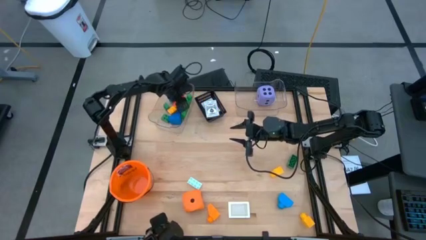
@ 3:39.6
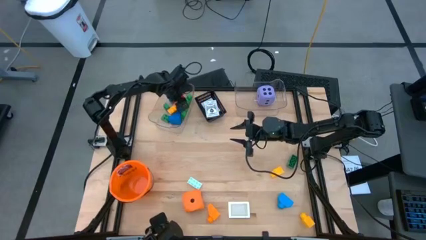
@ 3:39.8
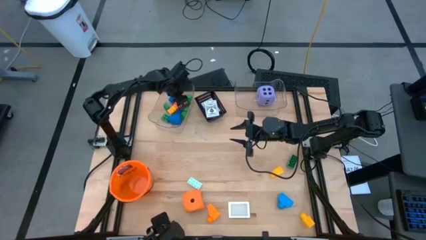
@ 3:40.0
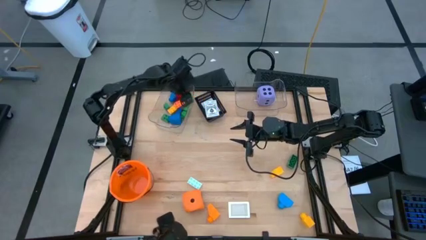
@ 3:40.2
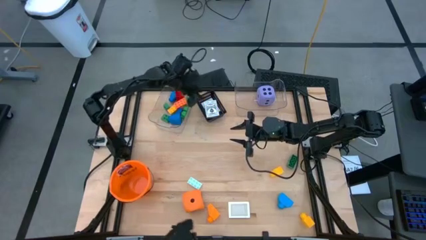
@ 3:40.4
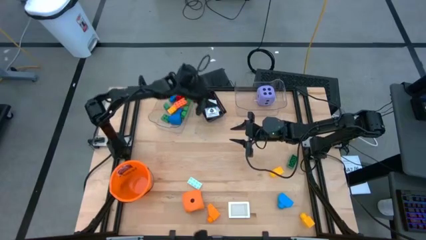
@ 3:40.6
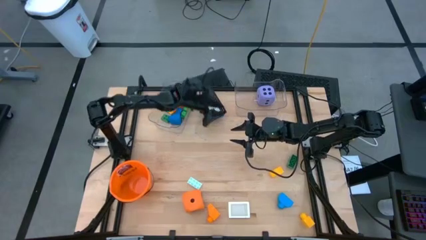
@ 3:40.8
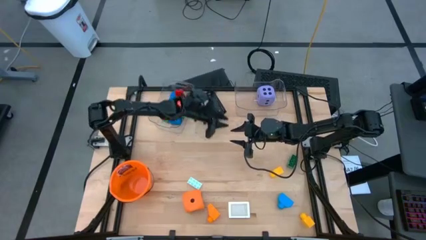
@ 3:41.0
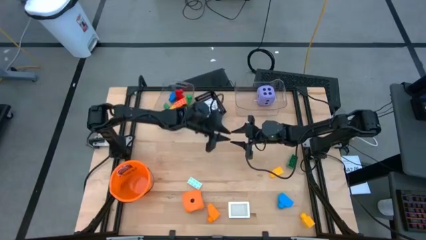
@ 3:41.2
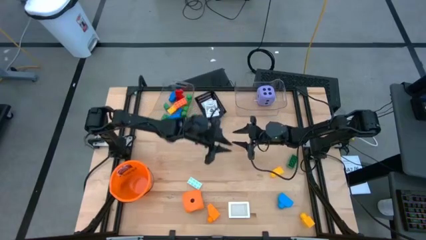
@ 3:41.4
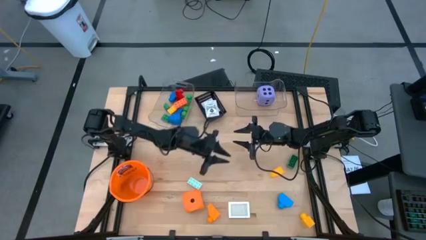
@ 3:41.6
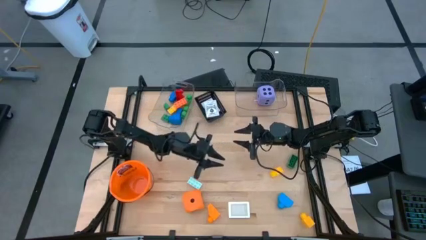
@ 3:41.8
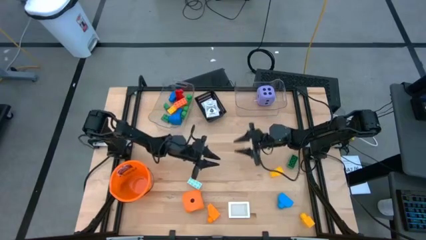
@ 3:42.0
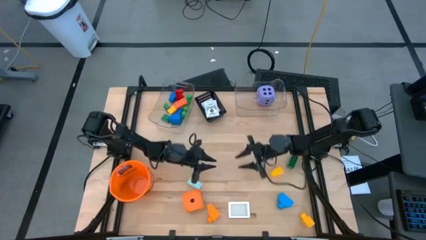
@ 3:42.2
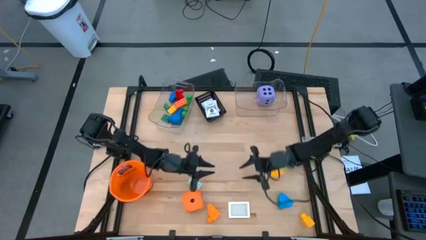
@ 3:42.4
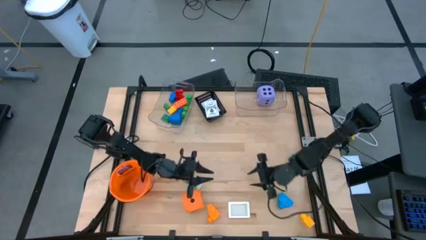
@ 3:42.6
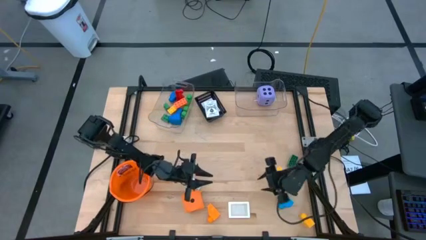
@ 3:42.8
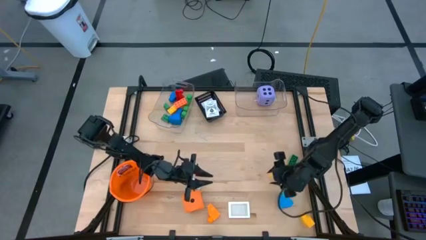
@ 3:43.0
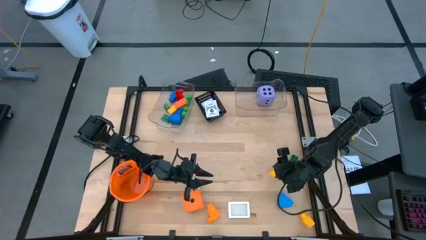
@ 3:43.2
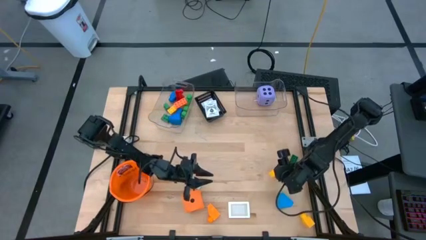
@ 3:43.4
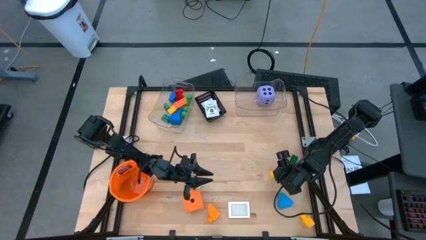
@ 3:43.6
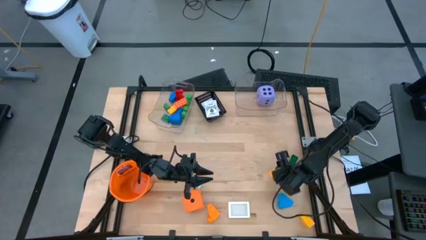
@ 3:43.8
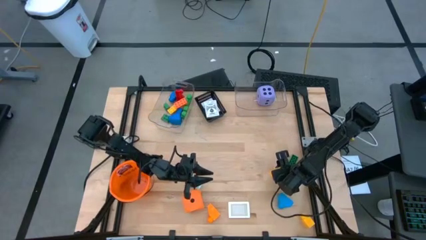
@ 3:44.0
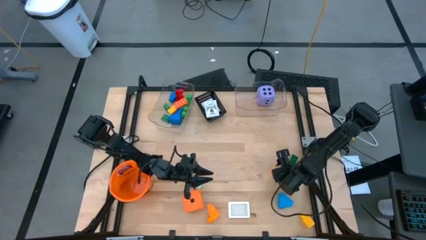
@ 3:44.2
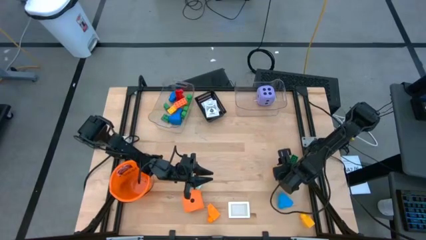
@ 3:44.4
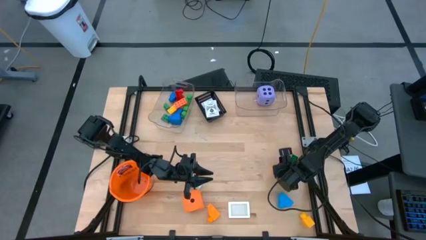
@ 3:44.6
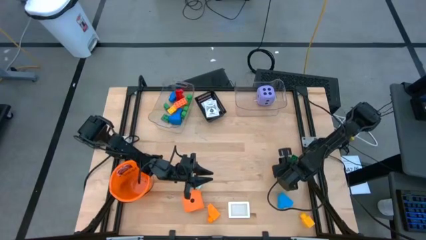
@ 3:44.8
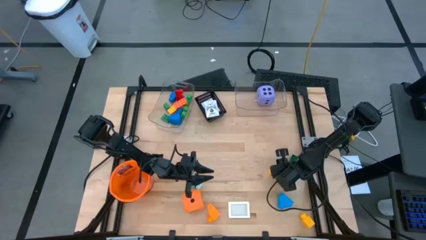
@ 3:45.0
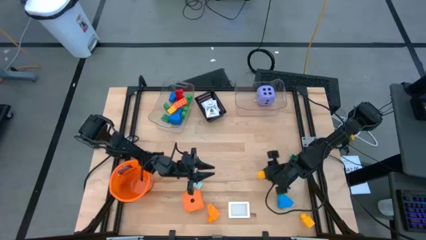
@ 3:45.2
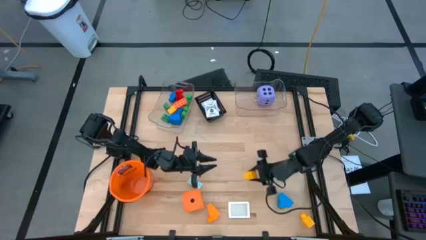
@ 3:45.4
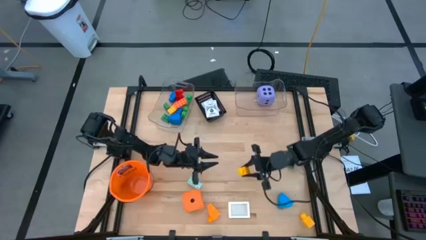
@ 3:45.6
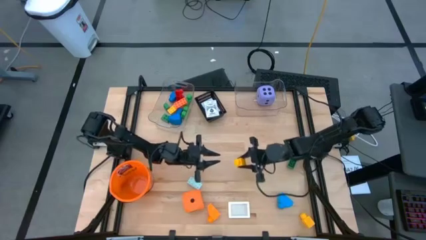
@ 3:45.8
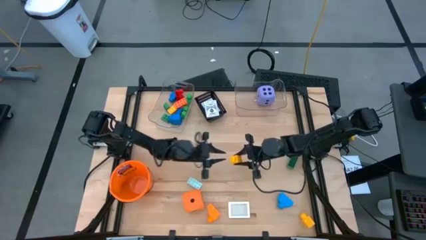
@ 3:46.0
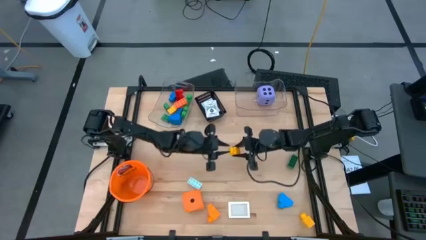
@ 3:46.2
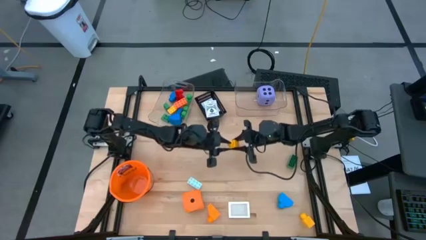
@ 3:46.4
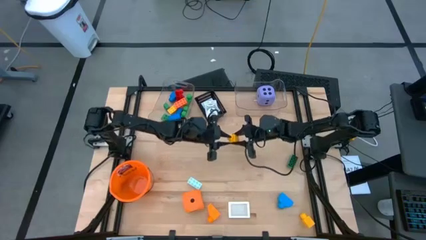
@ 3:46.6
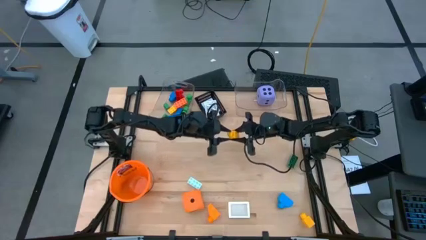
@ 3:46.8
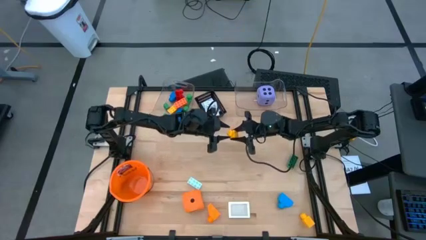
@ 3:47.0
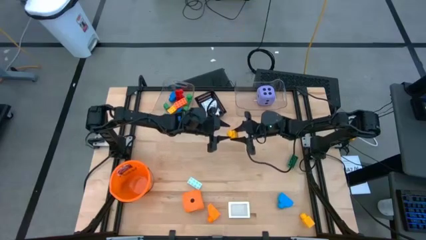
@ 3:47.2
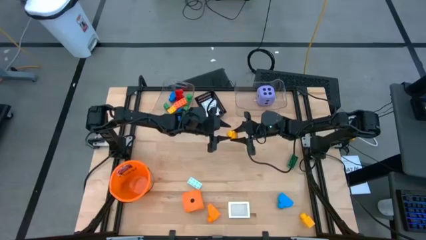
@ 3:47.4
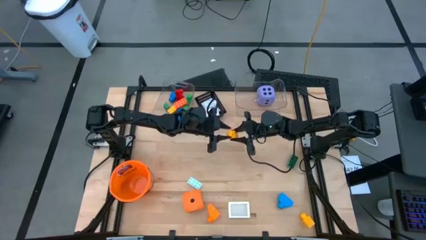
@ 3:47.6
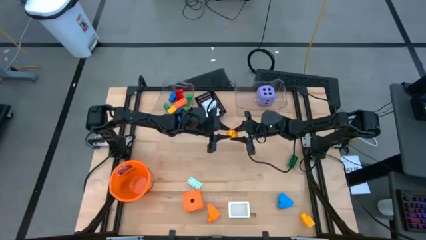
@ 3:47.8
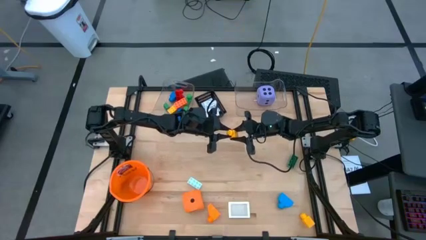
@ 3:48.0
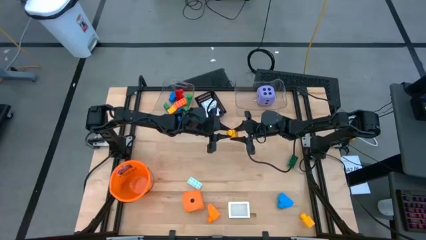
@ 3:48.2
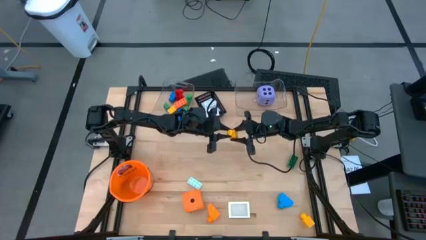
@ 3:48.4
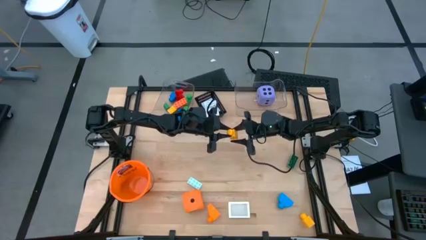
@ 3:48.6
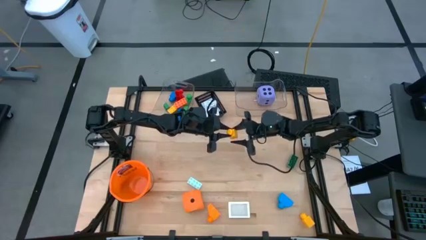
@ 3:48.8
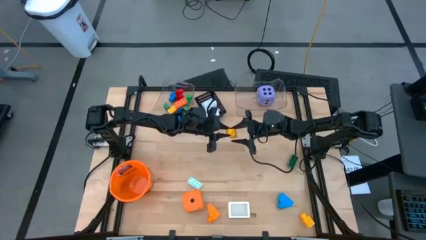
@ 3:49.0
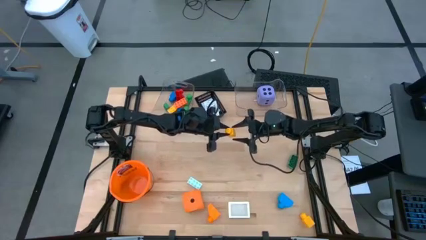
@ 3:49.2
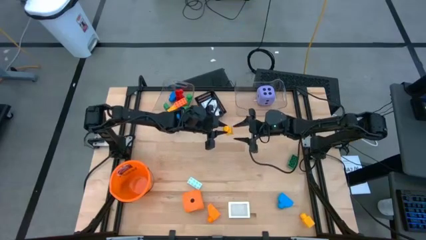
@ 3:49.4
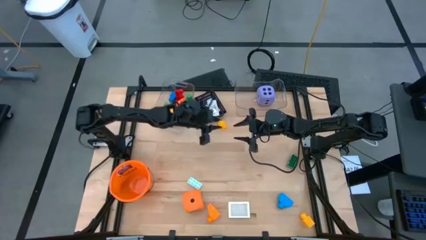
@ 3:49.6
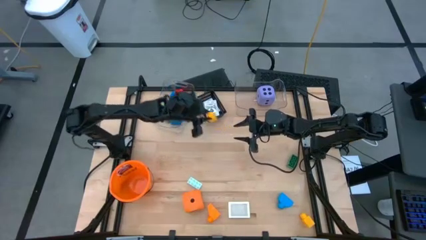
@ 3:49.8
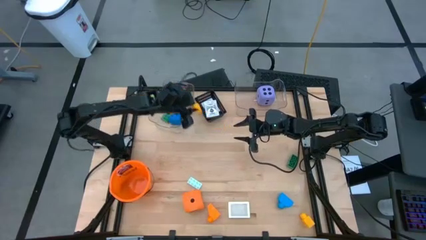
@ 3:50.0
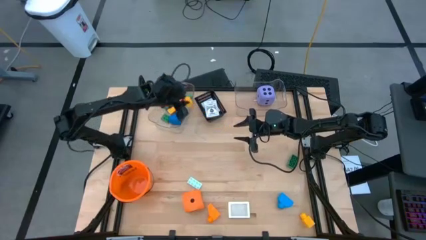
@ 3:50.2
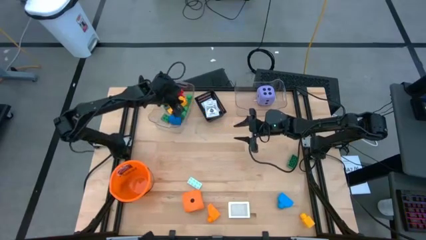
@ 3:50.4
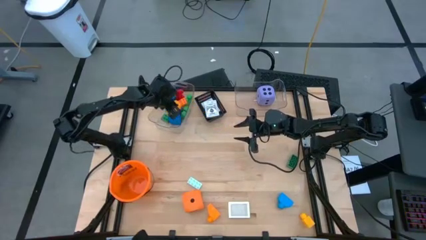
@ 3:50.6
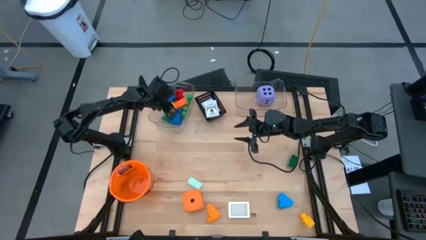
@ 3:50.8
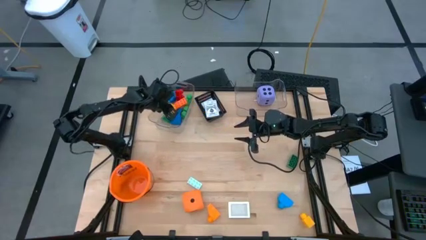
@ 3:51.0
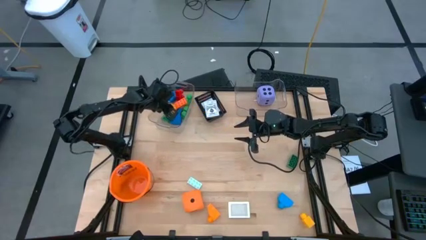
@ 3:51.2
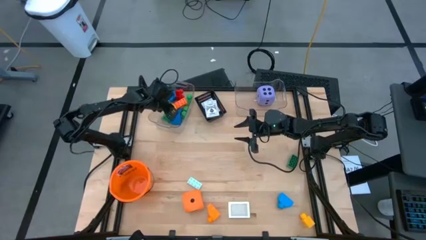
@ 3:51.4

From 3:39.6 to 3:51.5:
Task: Pick & Place Toys
Put the yellow gamepiece into the left transparent bin
